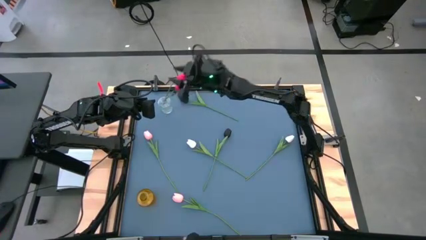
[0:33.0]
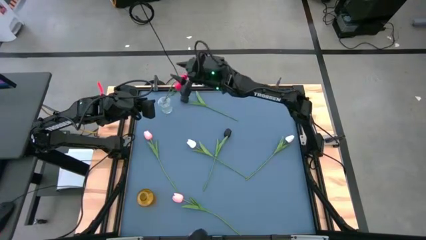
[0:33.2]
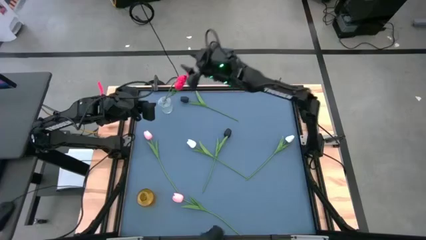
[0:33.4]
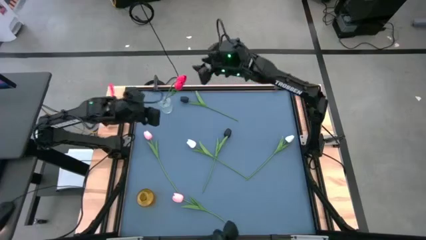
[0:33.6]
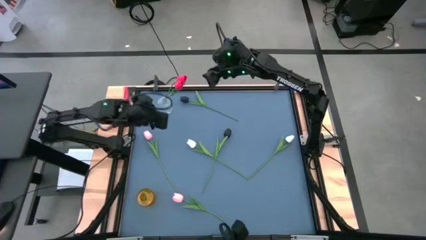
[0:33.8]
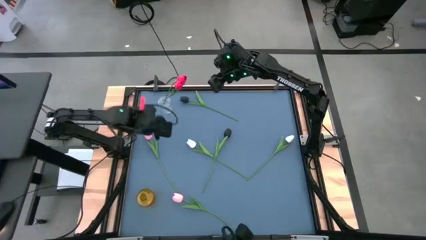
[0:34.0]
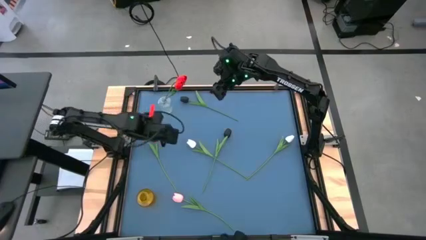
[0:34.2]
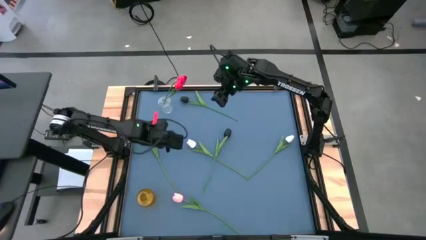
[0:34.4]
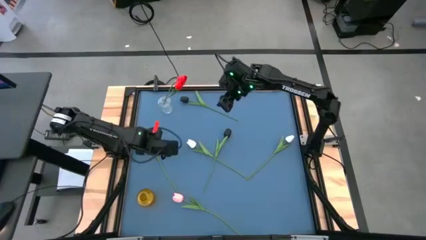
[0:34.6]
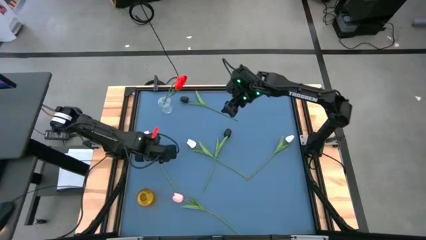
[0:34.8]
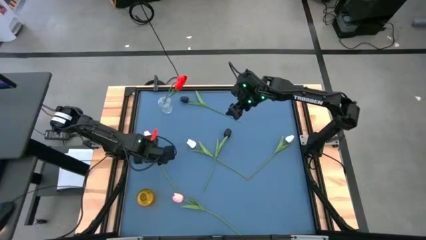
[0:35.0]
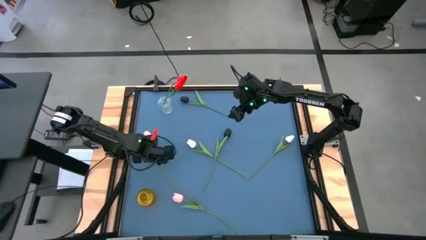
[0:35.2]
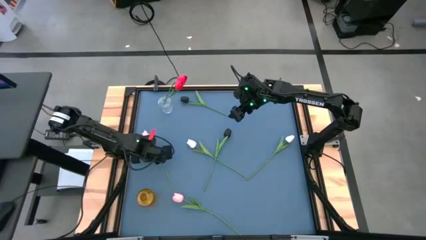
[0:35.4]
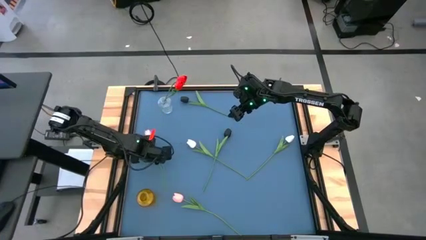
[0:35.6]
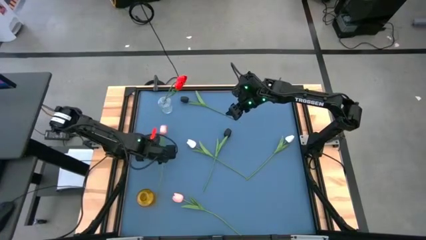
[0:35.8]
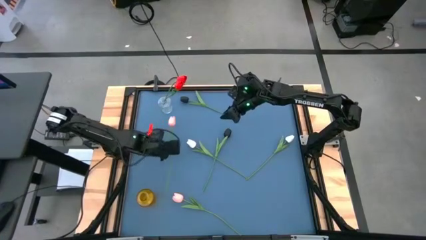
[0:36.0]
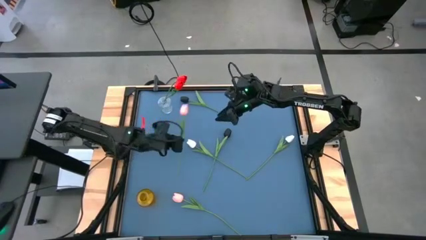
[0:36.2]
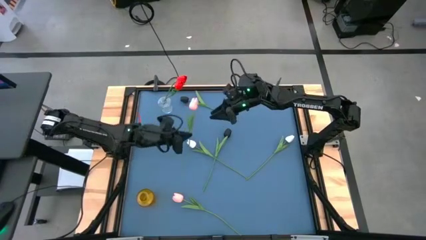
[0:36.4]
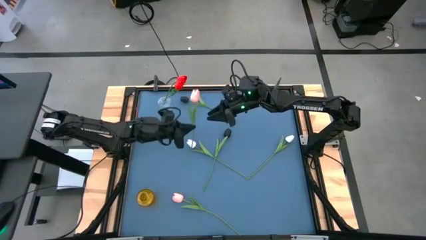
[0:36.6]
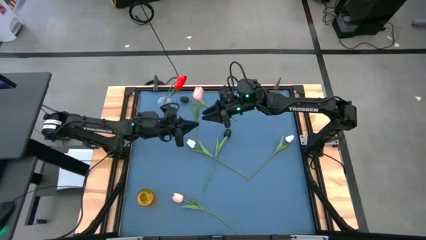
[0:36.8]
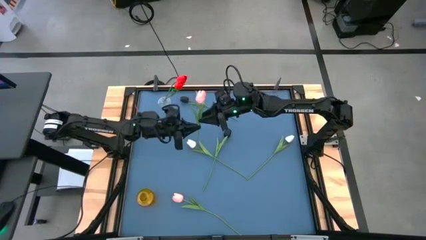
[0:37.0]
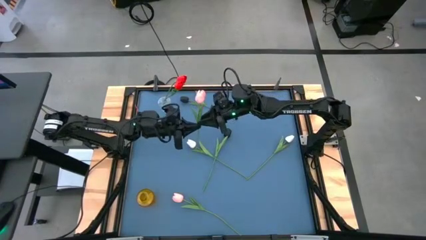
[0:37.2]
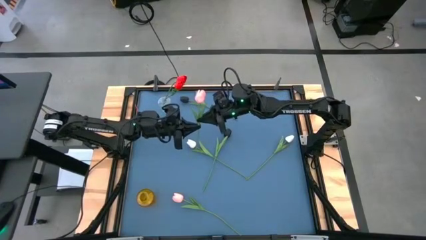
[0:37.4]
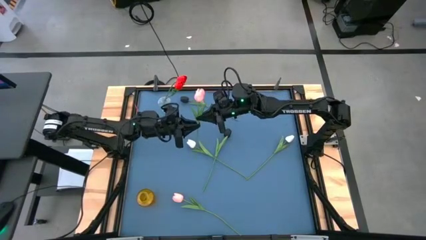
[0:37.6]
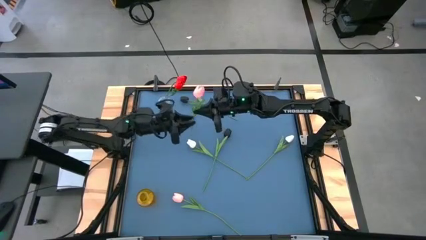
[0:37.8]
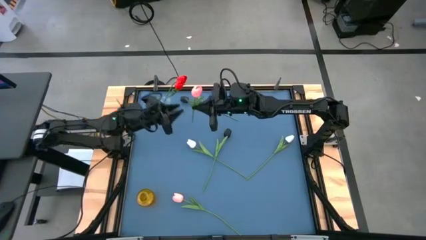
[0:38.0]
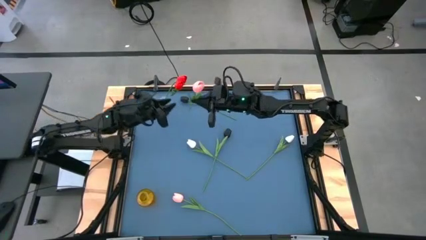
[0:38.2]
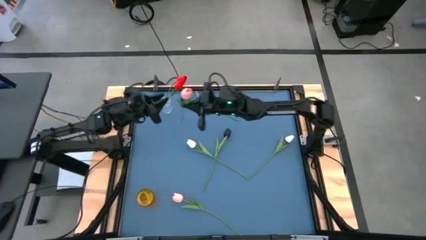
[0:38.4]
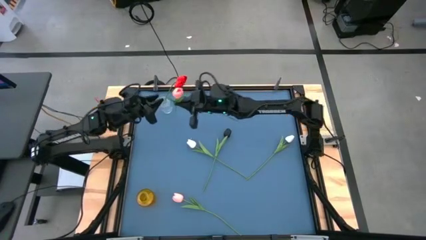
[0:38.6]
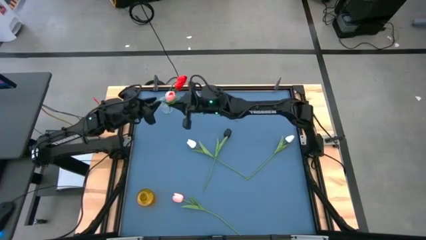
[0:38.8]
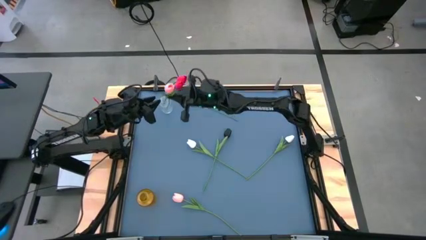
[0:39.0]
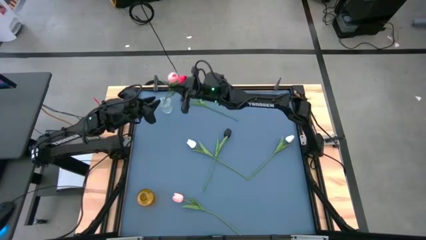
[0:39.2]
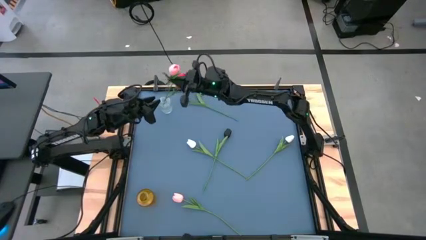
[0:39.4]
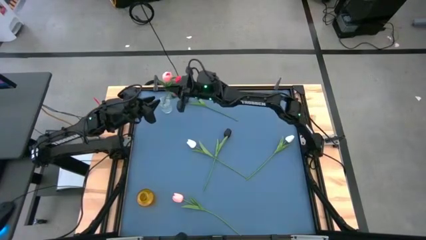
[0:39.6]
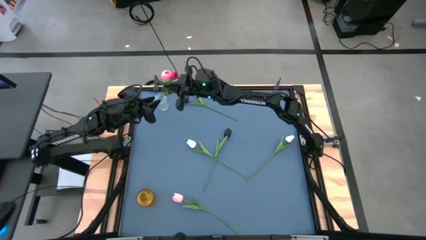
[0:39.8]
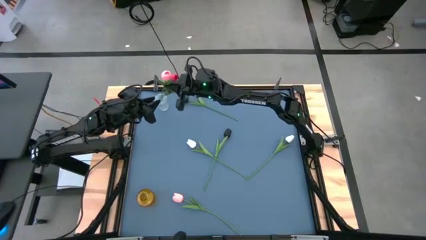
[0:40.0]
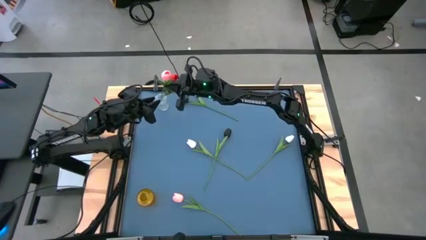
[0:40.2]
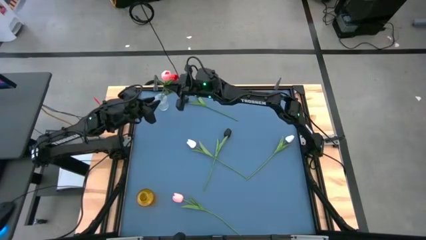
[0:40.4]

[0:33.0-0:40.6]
Task: Sort flowers into vase by color
Put the light pink flower into the transparent vase

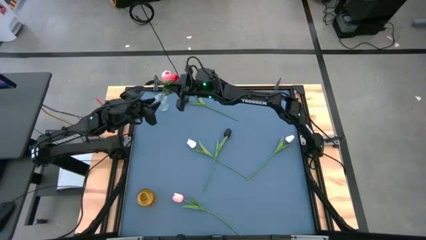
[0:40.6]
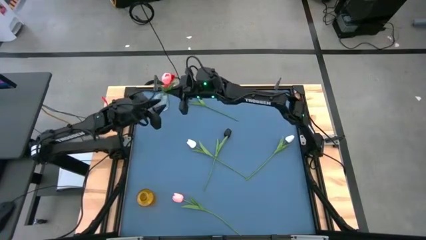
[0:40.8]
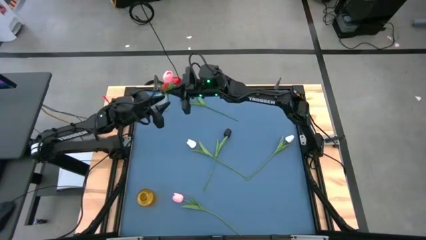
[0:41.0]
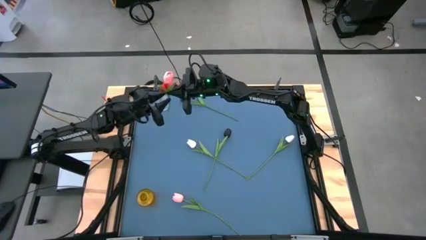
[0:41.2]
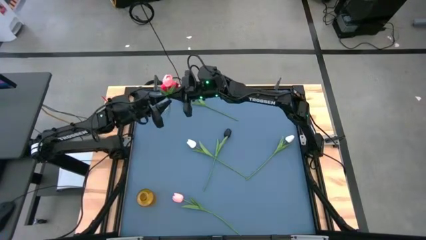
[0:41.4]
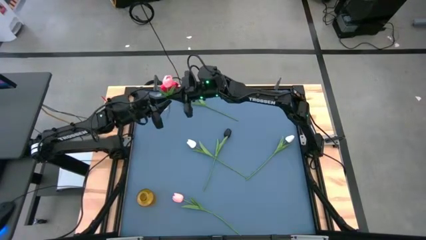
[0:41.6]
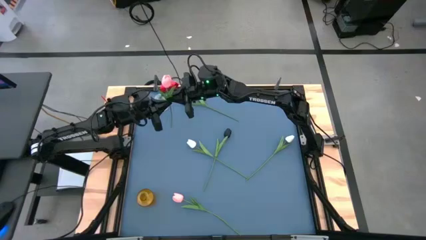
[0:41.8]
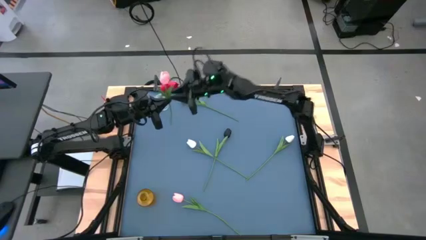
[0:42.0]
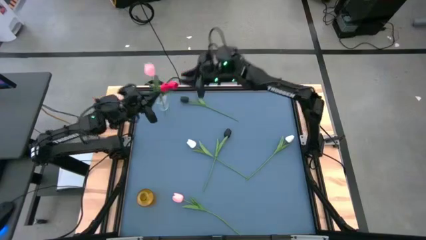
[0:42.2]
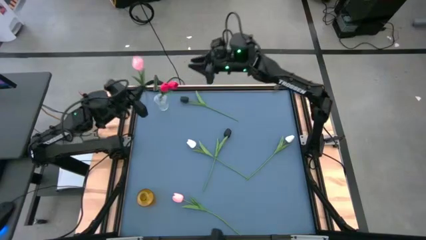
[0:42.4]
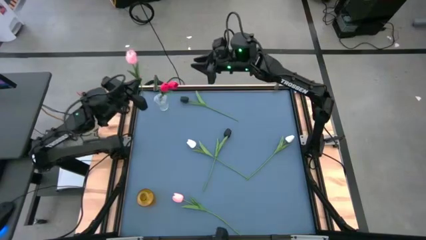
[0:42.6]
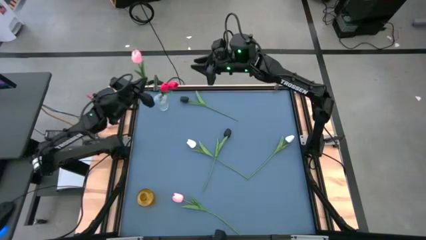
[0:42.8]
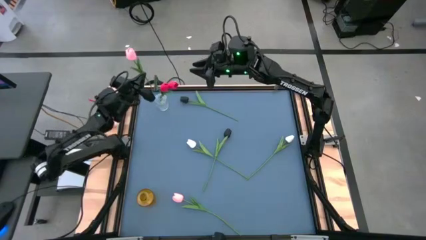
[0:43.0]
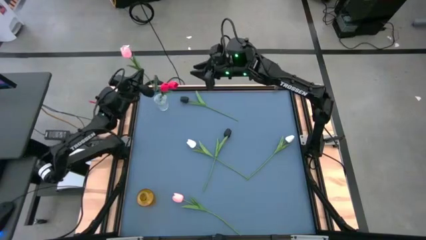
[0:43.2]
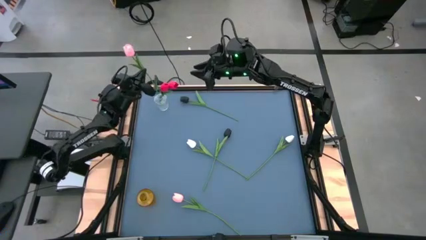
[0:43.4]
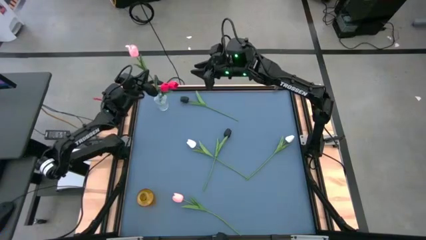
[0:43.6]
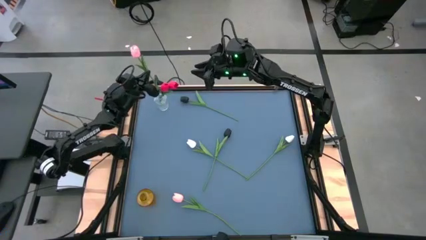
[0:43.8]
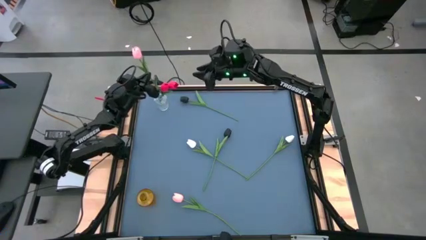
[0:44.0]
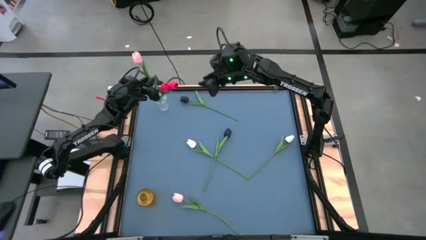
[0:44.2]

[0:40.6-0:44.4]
Put the light pink flower into the transparent vase

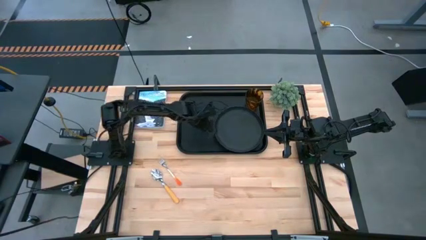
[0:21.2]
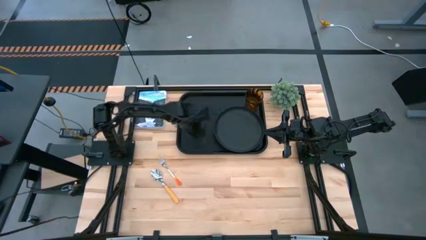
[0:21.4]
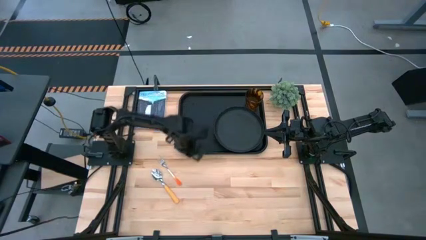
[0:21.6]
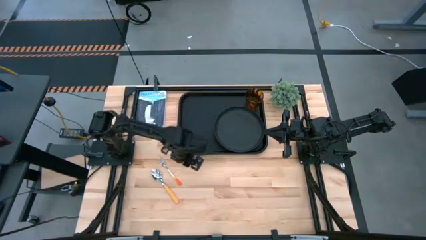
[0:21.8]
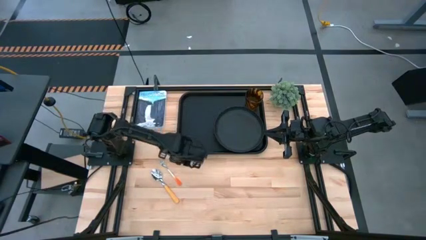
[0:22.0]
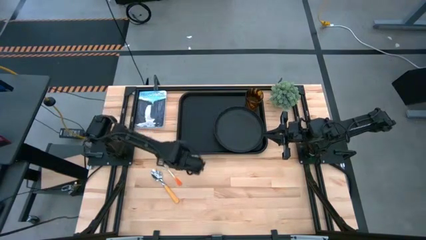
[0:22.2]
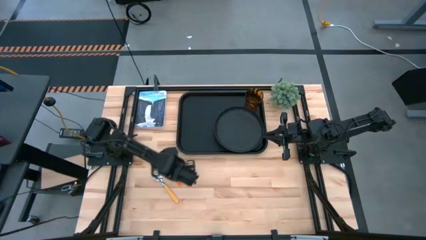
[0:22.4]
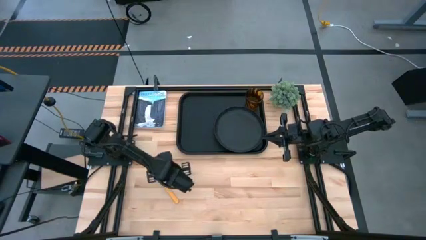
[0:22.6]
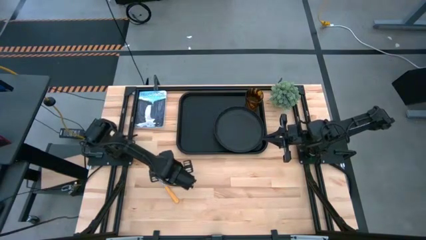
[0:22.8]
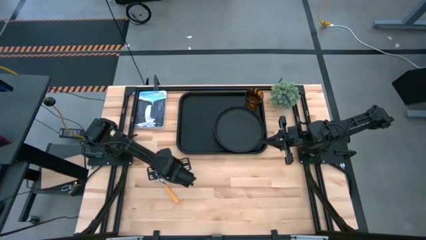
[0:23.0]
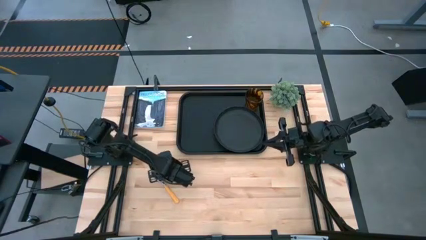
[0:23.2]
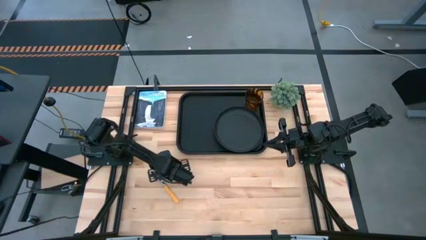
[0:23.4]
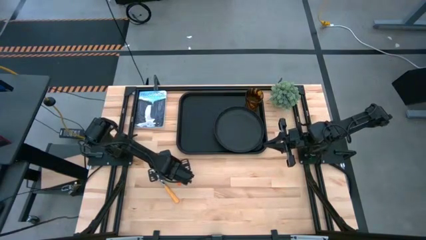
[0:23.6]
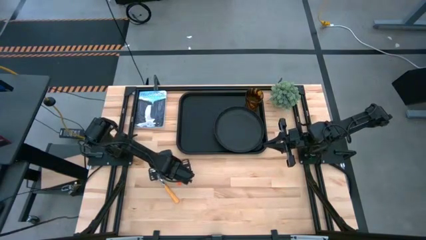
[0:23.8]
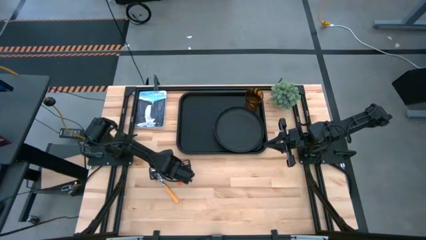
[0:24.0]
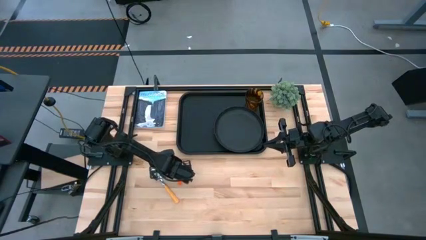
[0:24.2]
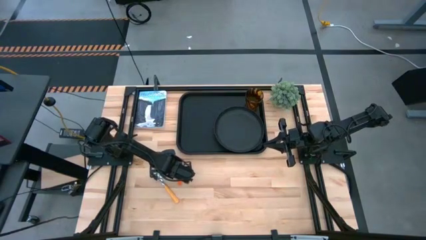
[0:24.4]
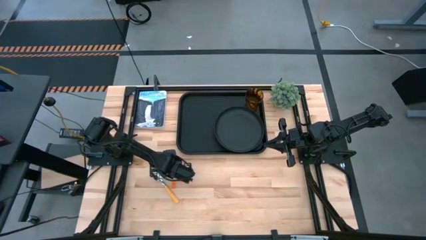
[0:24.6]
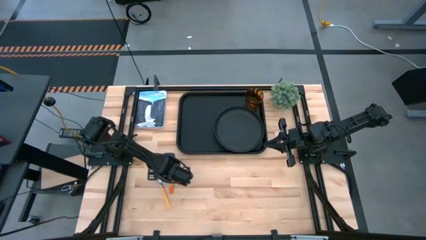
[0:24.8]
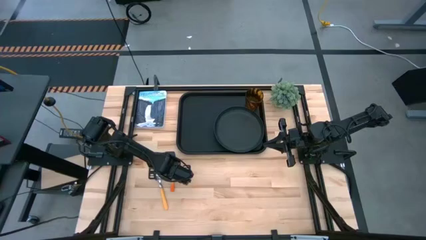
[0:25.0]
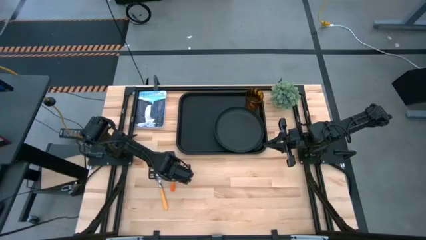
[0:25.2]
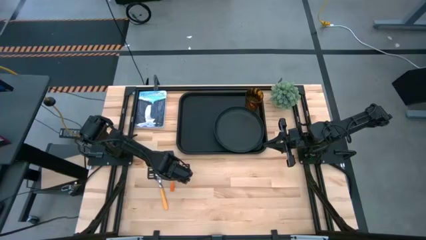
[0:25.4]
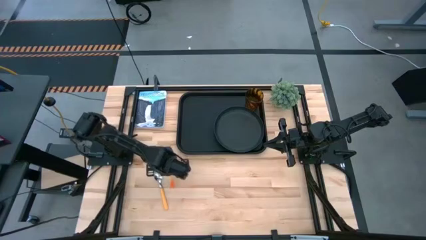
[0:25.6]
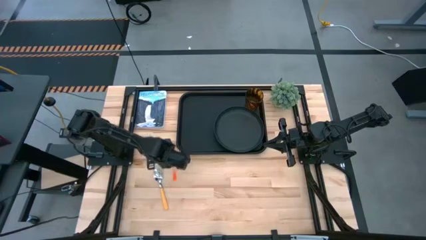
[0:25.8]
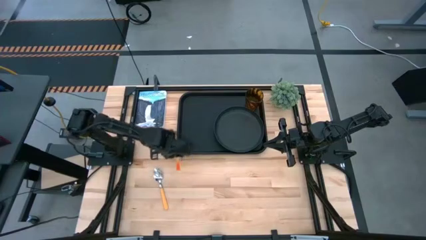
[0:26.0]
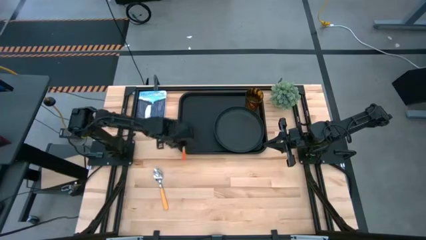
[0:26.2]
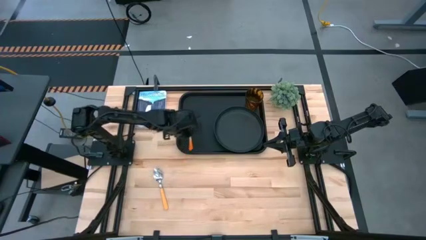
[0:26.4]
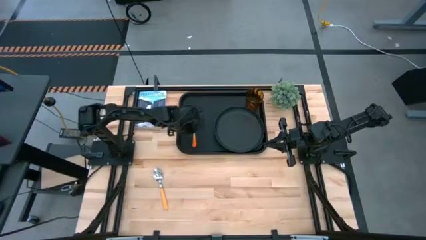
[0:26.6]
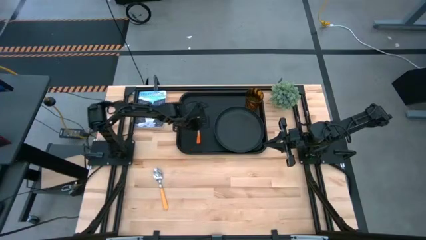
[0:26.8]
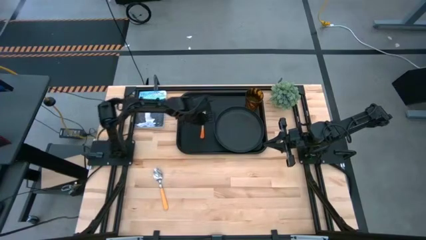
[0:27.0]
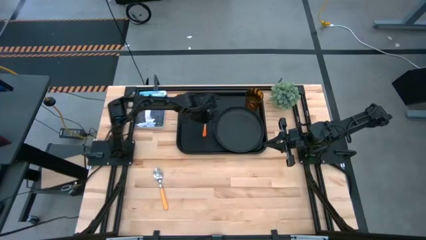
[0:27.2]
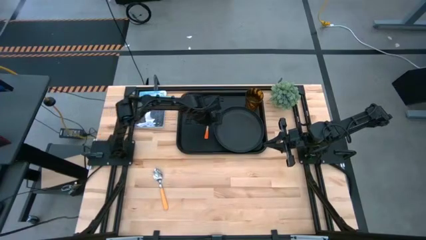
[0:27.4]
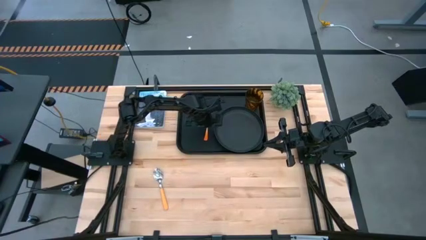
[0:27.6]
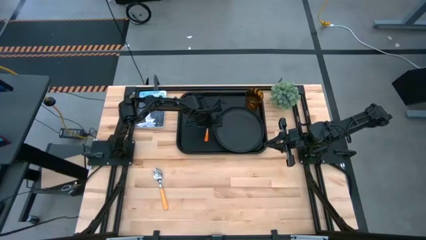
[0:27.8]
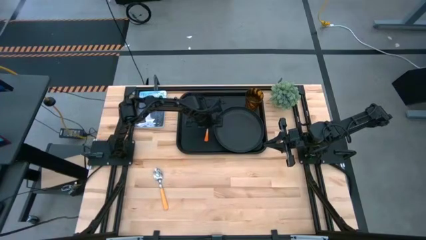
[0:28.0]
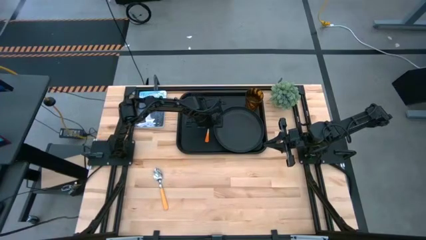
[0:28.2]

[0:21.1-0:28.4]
Task: Pick and place plate/cup/fork/spoon on tray
Put the orange fork on the black serving tray to the left of the black plate
